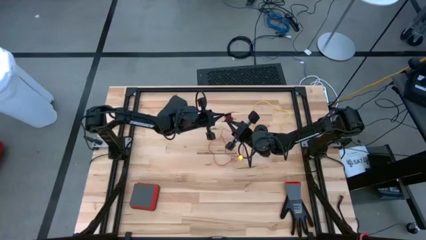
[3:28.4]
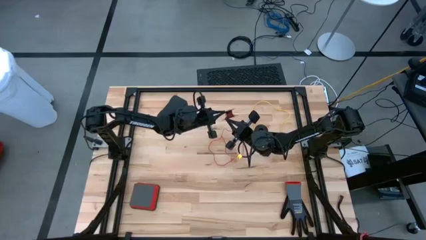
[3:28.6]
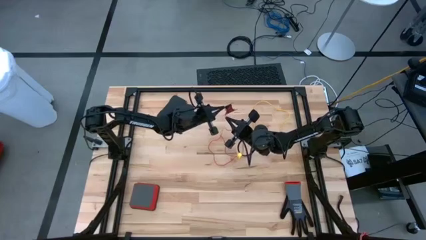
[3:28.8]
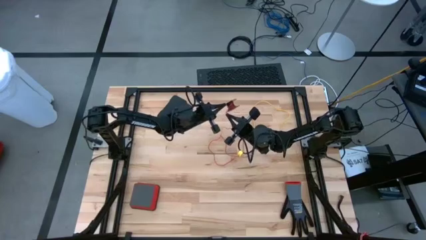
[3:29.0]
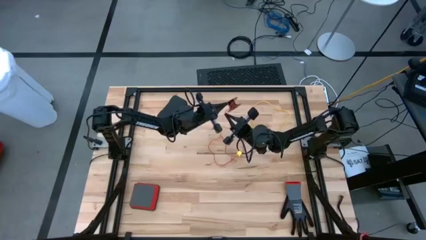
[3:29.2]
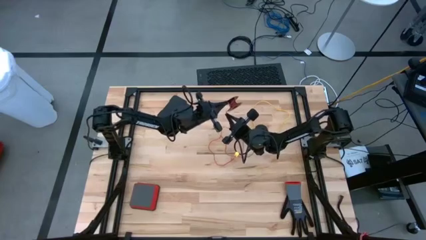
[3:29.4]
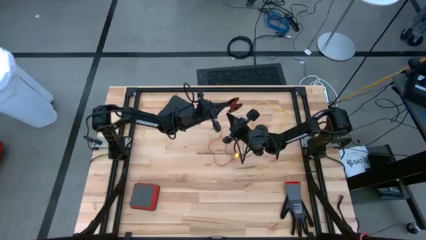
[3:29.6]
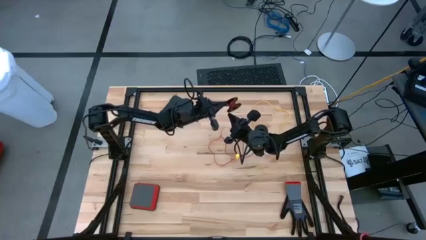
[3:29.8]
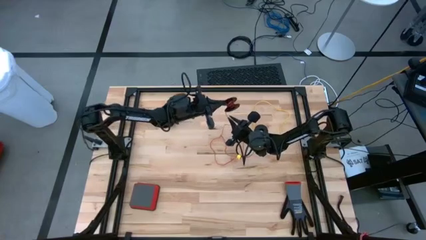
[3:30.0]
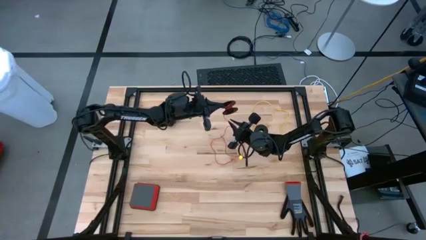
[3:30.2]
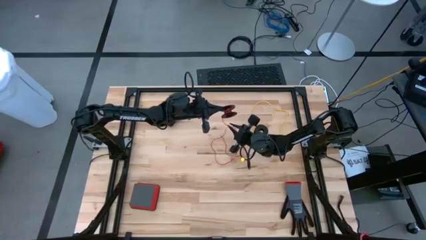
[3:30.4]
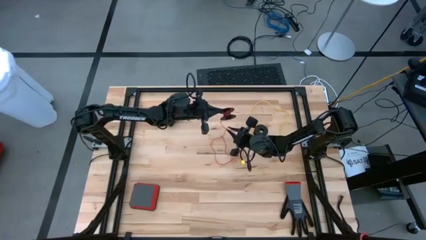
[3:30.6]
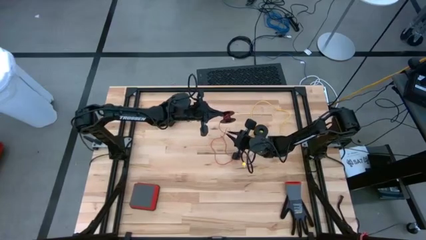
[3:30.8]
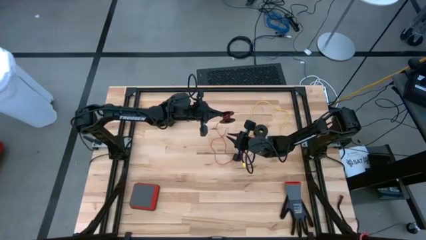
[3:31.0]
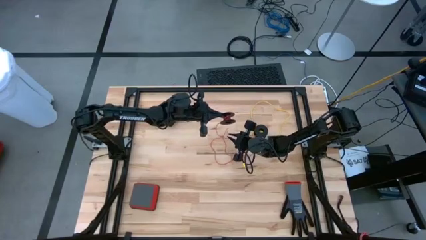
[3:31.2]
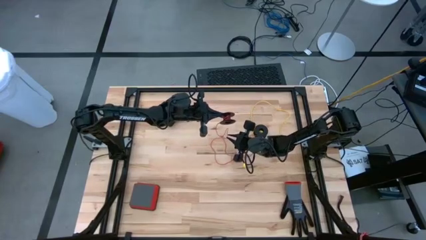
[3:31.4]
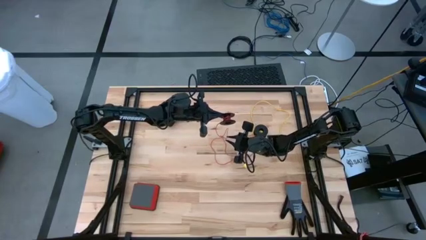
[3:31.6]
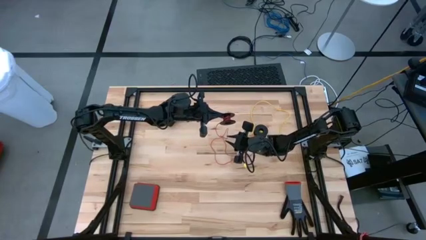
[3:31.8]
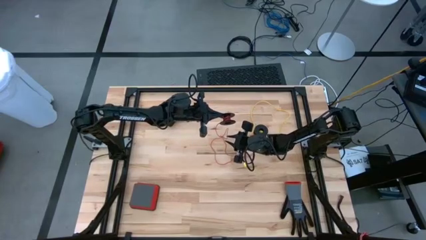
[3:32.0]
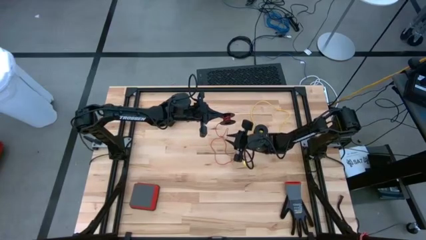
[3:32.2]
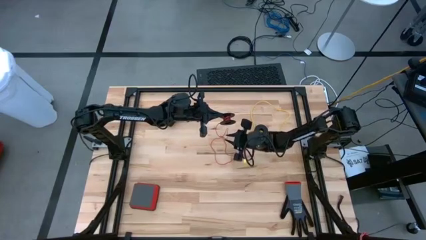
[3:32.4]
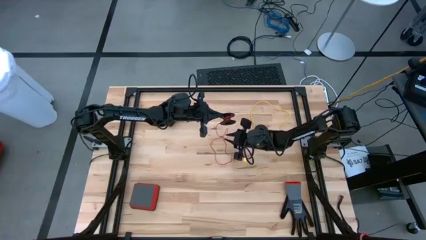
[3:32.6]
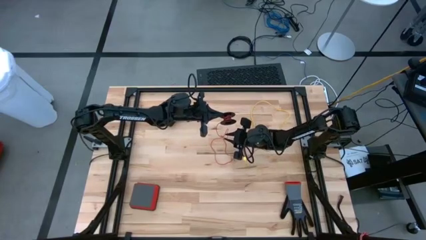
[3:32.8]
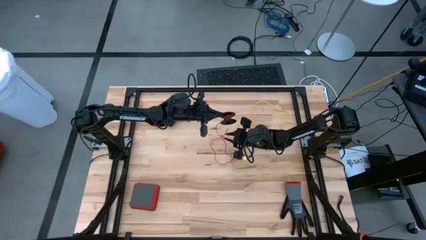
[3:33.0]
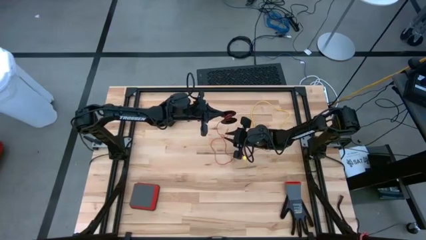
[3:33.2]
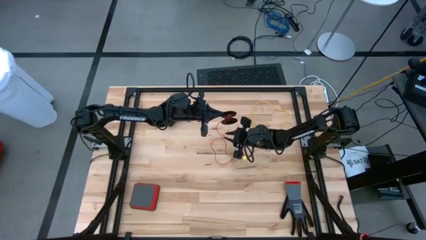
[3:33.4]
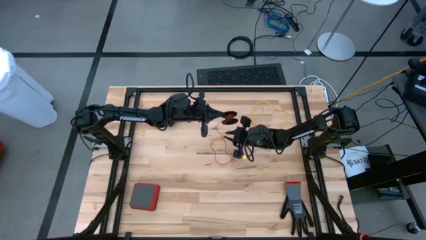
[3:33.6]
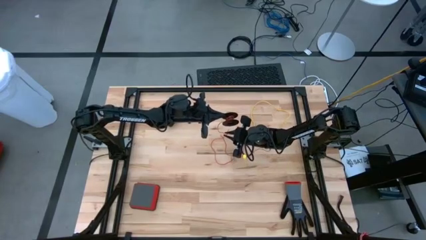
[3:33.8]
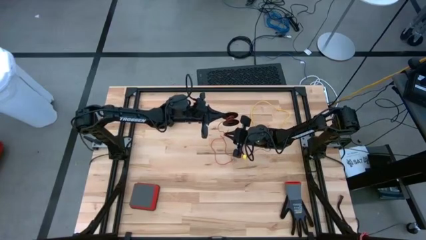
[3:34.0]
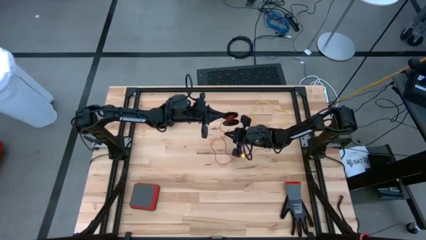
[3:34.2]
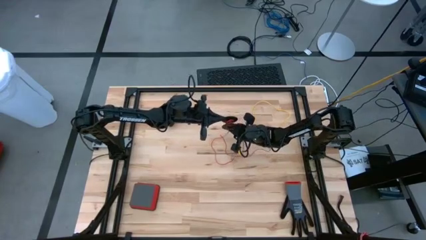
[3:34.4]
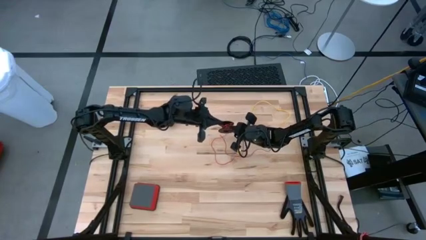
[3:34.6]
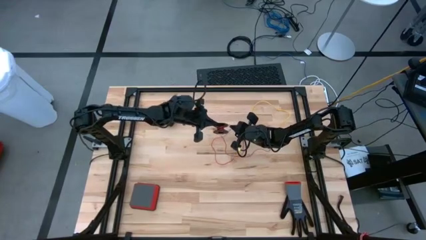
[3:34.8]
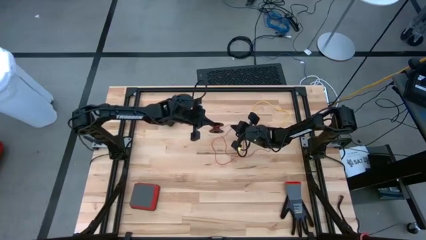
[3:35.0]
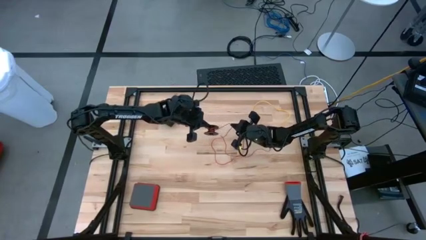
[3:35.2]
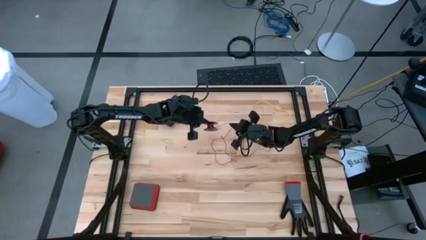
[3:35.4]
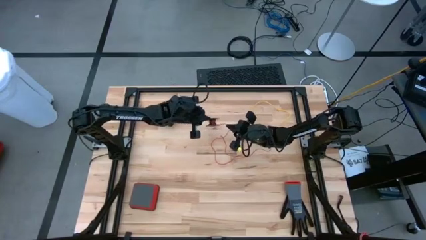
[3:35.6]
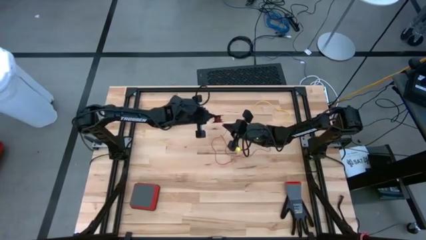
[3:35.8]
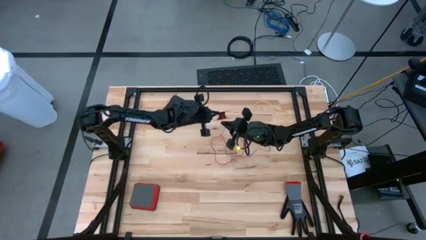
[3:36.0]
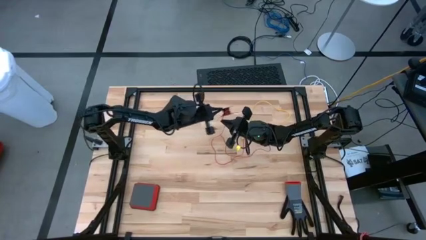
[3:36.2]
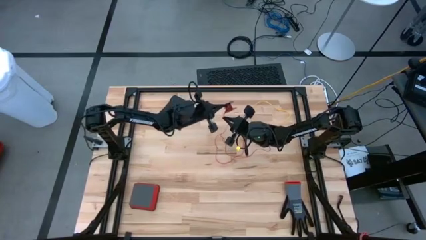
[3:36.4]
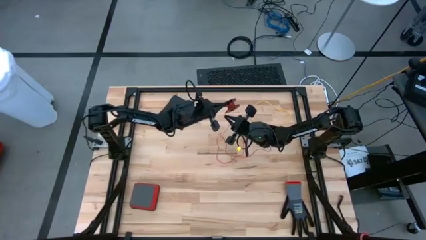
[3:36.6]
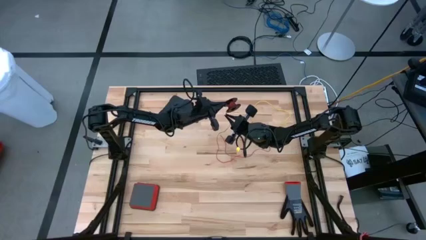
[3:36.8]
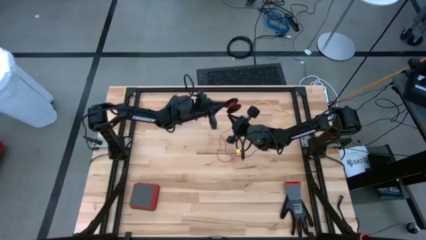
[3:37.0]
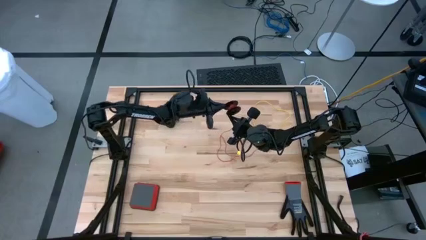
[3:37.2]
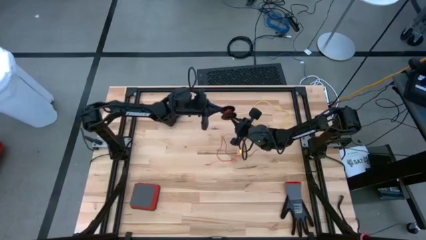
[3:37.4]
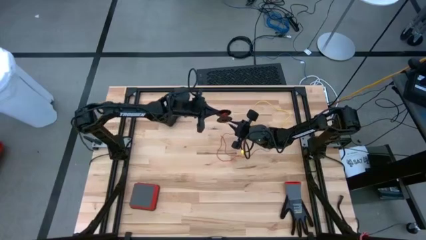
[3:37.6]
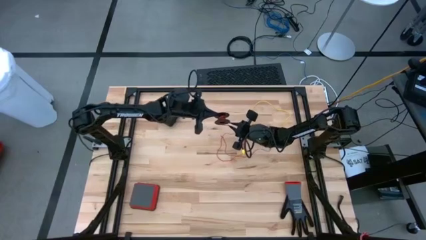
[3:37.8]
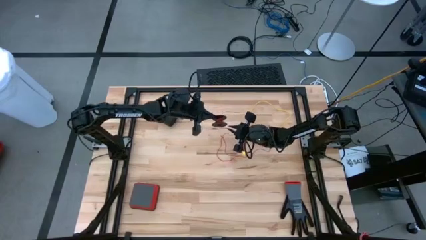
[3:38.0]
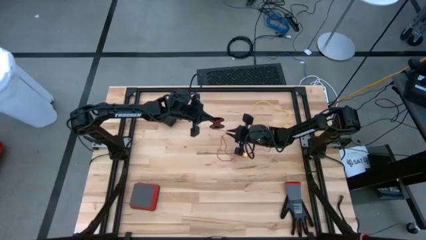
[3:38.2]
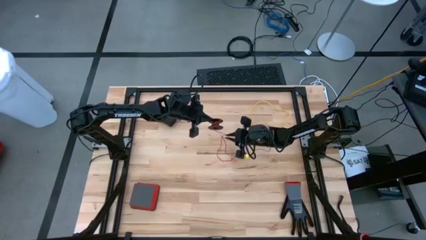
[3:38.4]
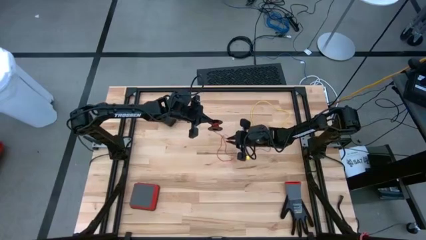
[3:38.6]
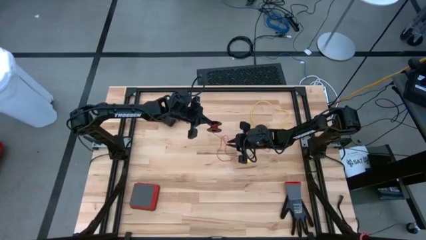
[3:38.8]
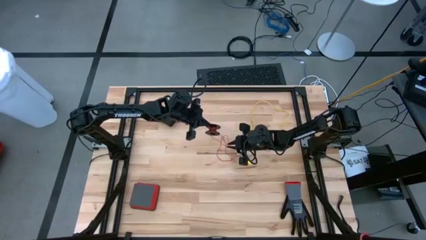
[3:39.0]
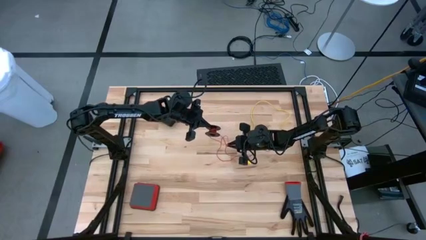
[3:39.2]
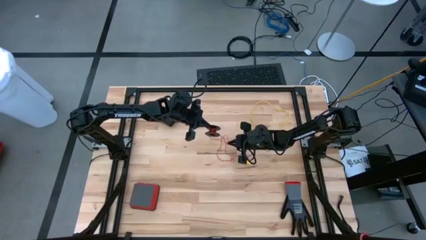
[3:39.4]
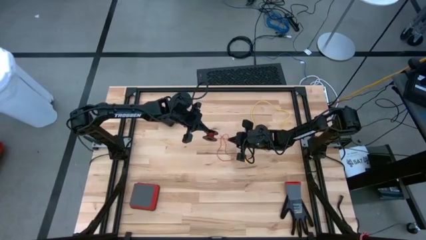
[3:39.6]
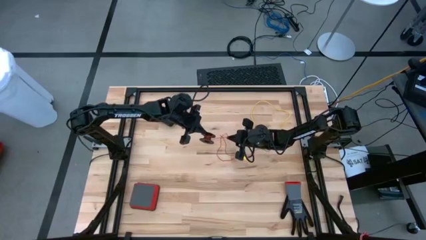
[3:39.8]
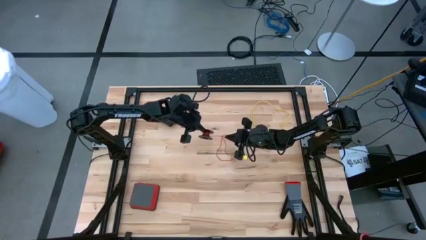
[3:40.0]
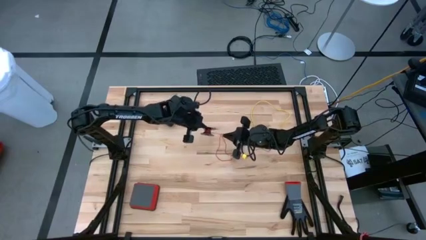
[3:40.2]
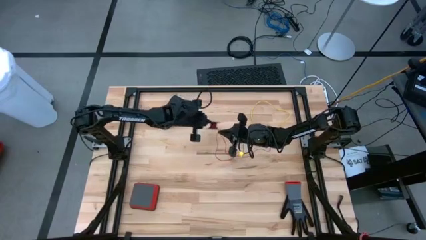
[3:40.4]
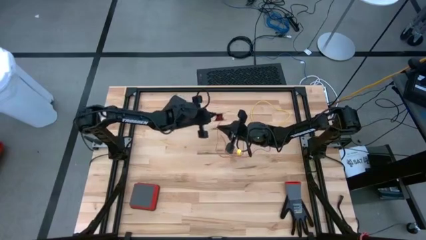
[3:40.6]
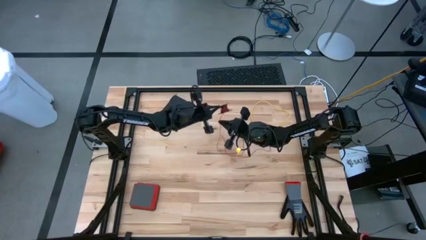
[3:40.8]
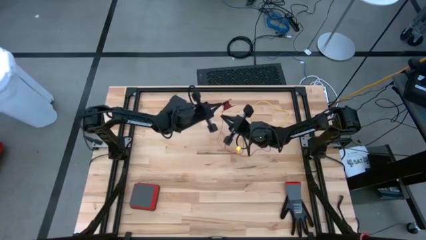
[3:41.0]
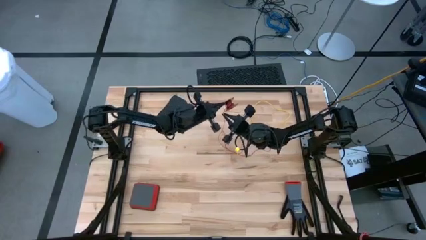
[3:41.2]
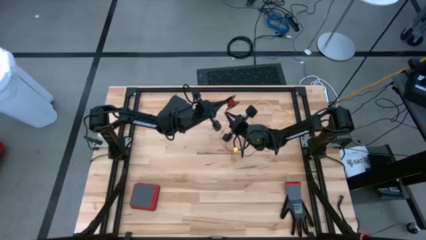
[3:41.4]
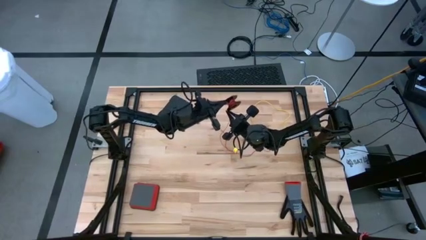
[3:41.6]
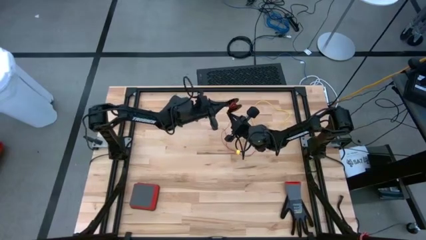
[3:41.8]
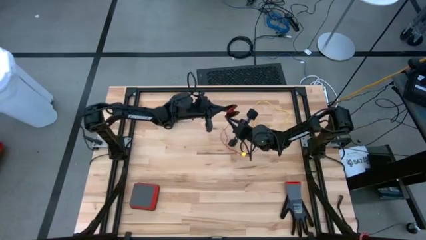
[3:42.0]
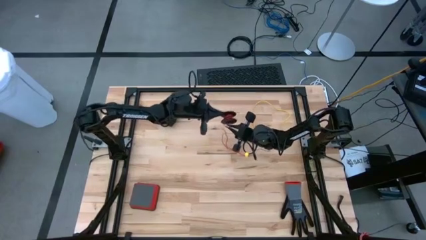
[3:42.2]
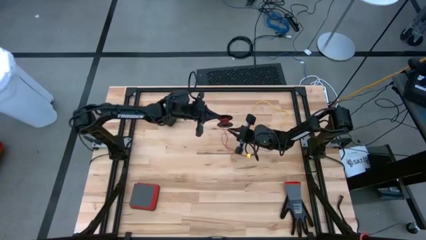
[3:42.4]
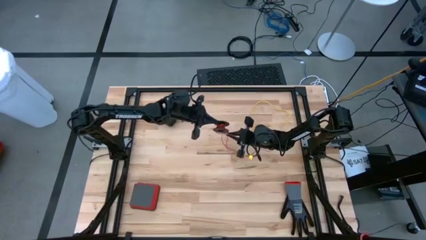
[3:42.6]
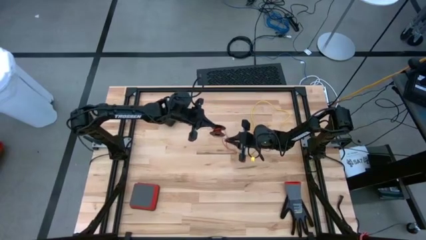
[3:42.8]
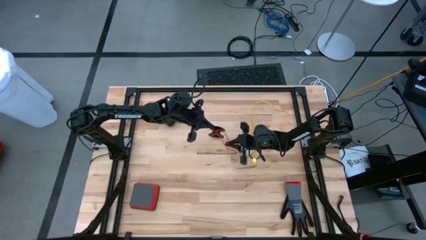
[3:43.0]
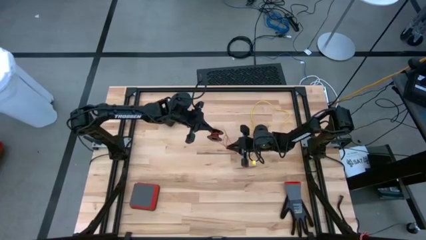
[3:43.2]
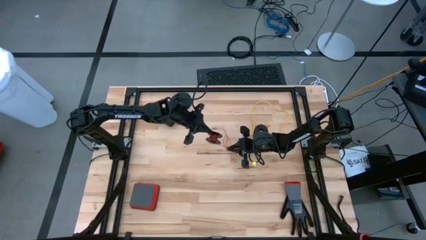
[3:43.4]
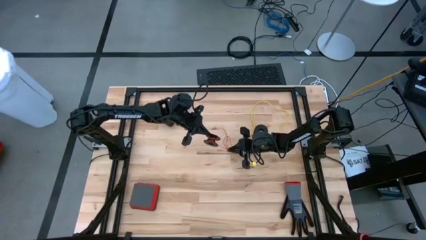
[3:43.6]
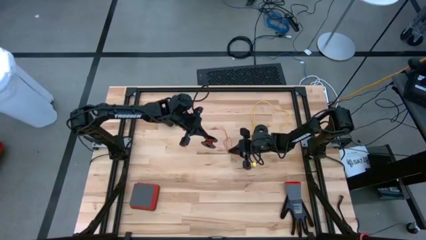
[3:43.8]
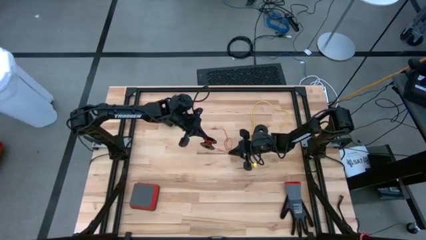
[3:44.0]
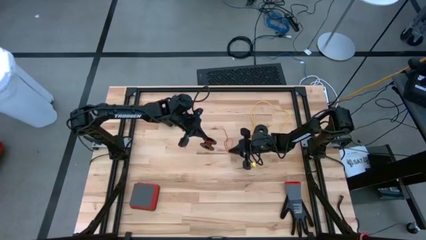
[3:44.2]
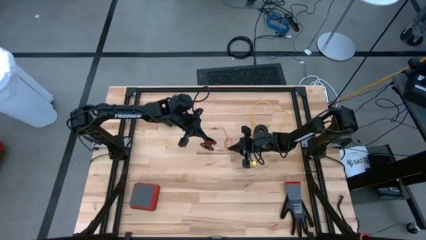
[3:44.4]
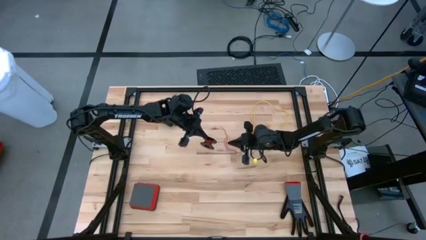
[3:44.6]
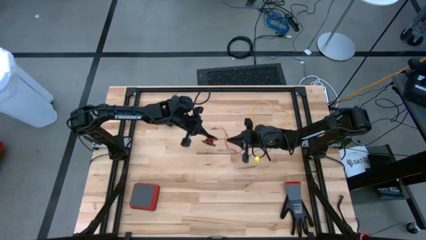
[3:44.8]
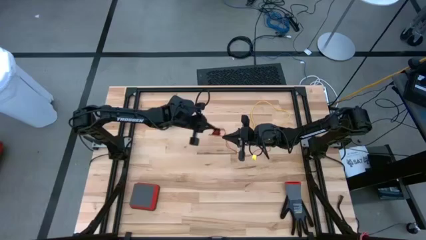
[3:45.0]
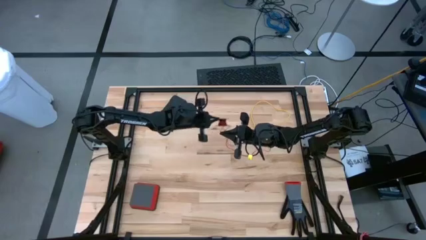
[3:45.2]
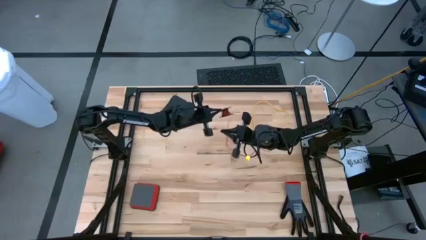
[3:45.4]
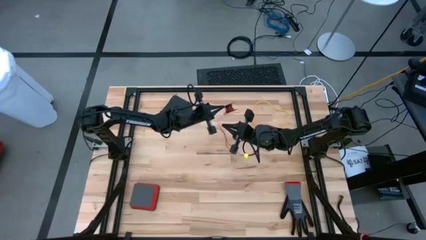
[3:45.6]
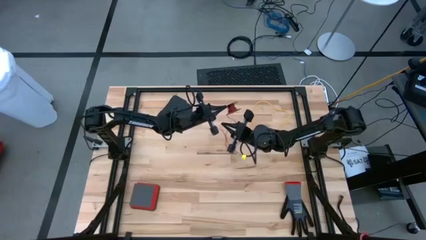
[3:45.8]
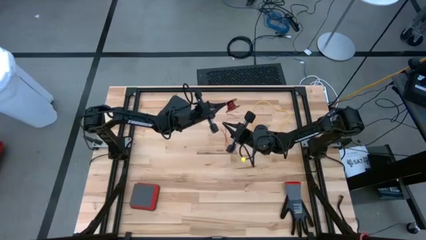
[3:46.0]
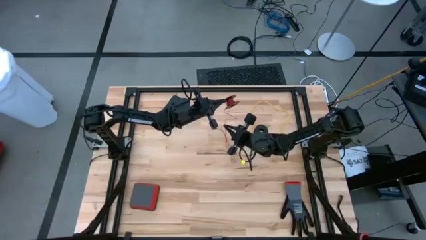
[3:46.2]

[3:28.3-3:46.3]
Task: Coil cords
Coil the red wire onto the black spool
